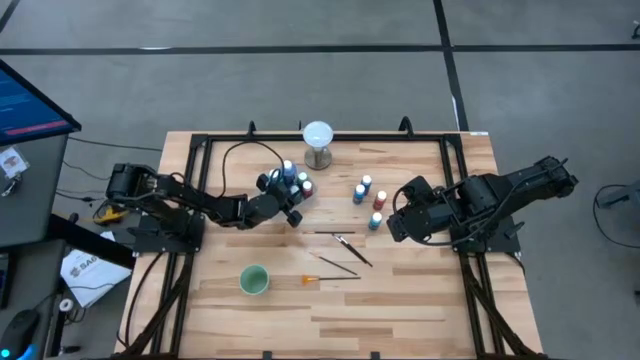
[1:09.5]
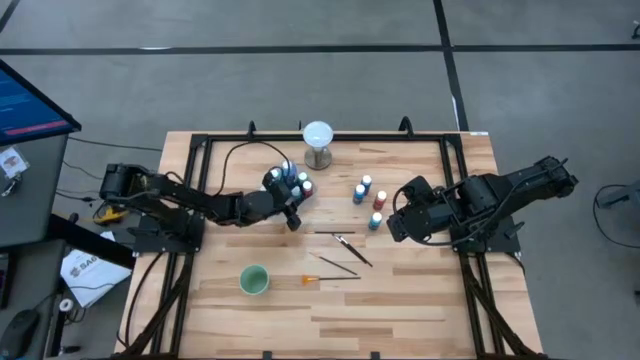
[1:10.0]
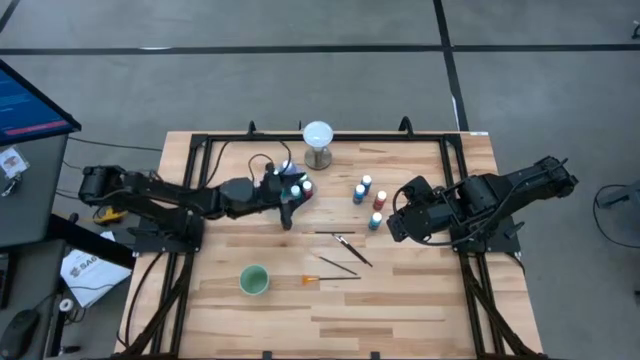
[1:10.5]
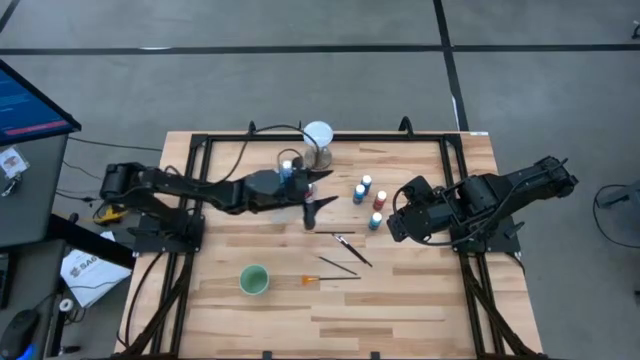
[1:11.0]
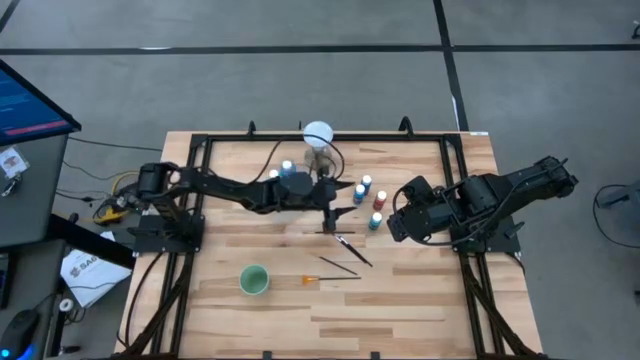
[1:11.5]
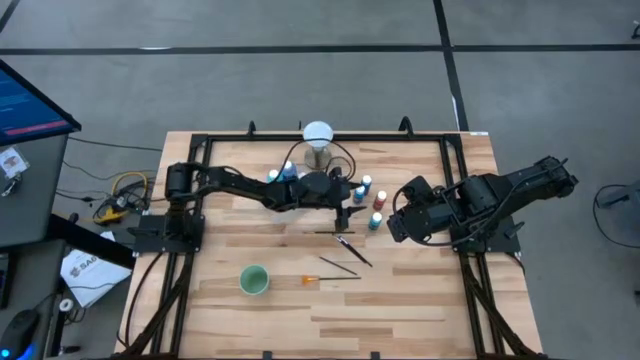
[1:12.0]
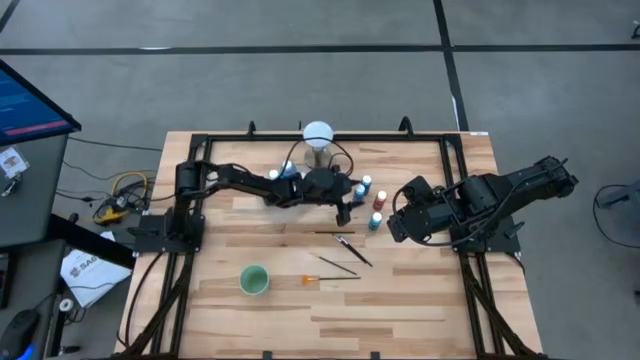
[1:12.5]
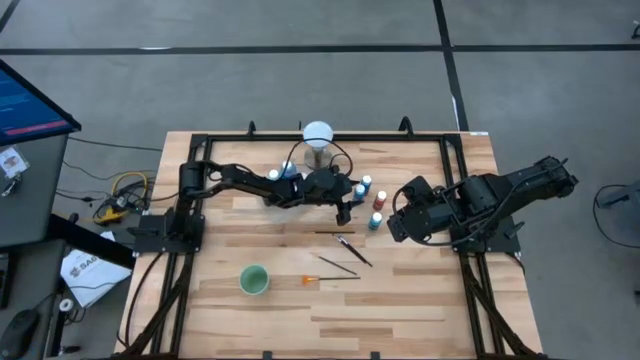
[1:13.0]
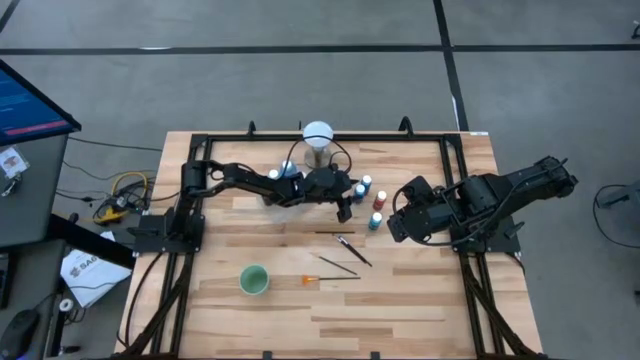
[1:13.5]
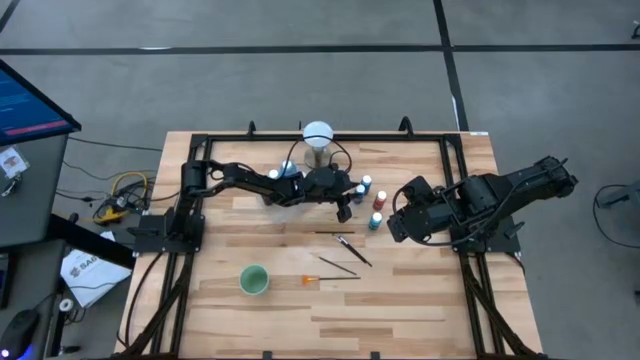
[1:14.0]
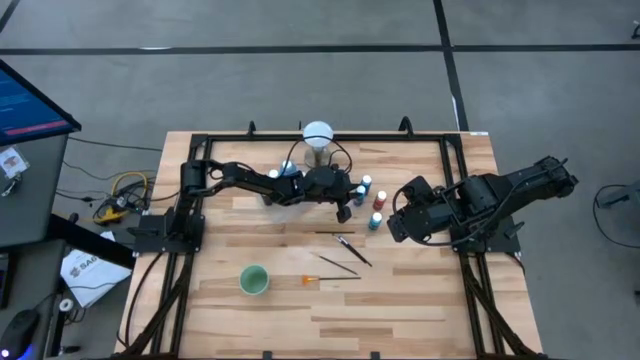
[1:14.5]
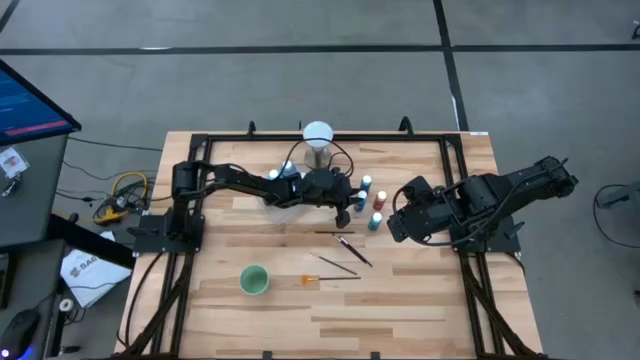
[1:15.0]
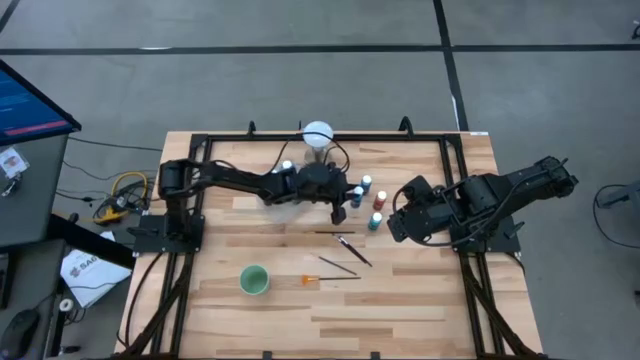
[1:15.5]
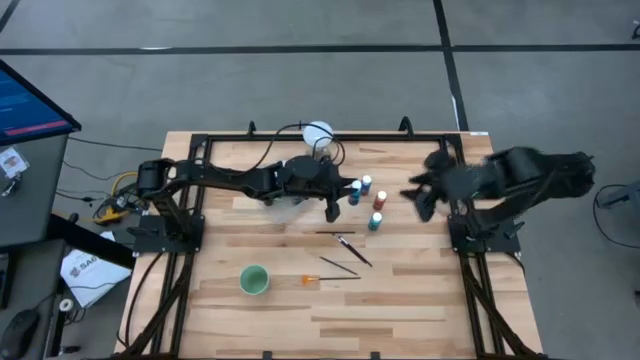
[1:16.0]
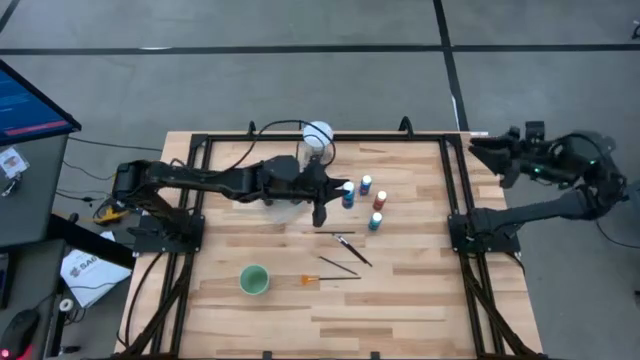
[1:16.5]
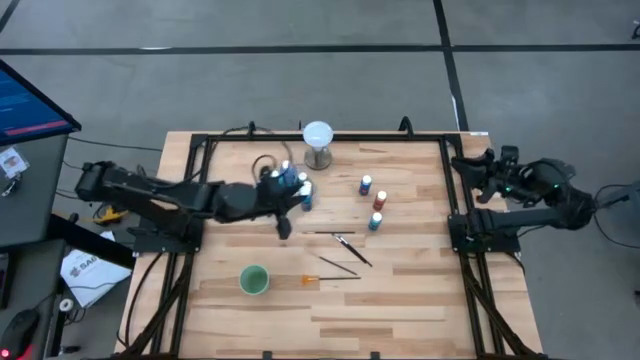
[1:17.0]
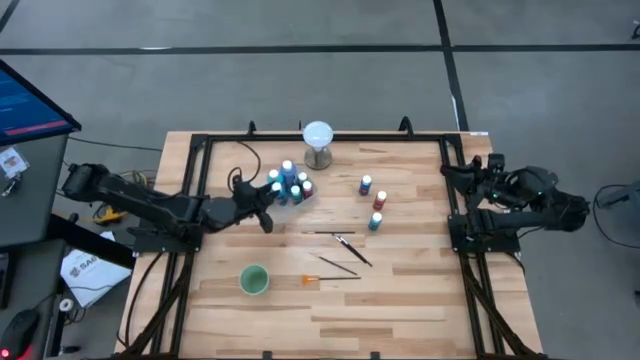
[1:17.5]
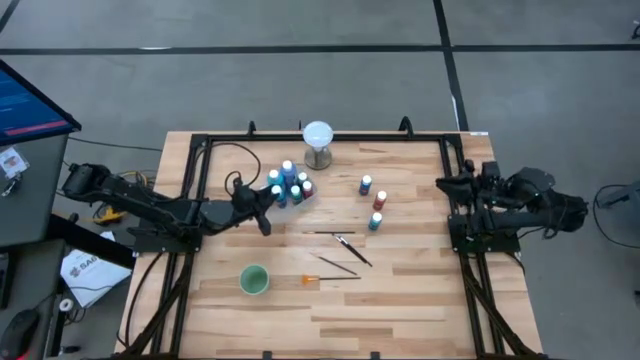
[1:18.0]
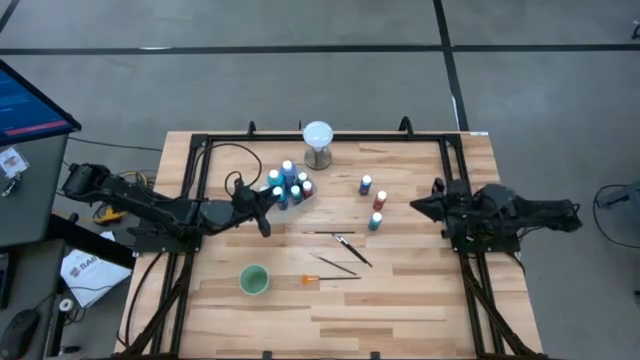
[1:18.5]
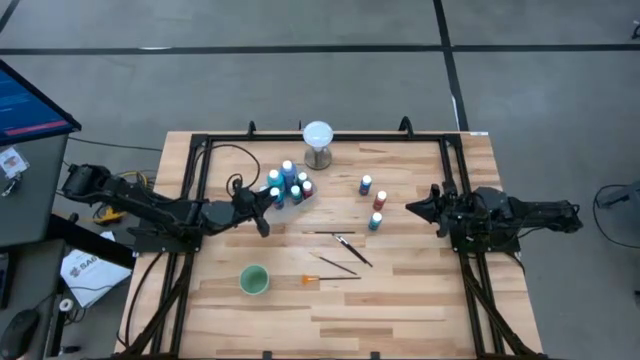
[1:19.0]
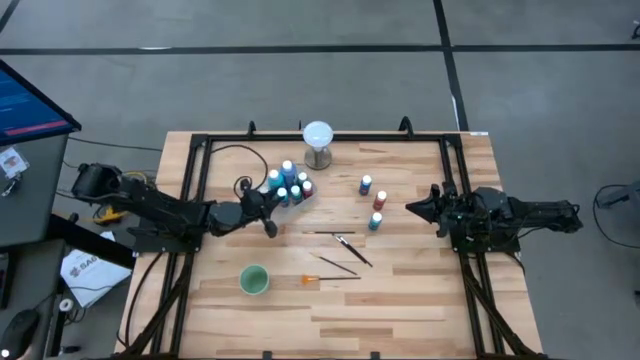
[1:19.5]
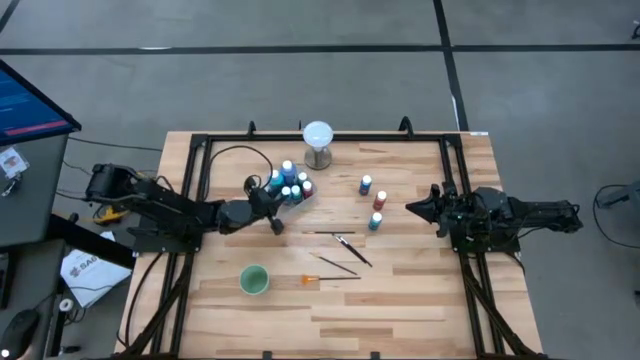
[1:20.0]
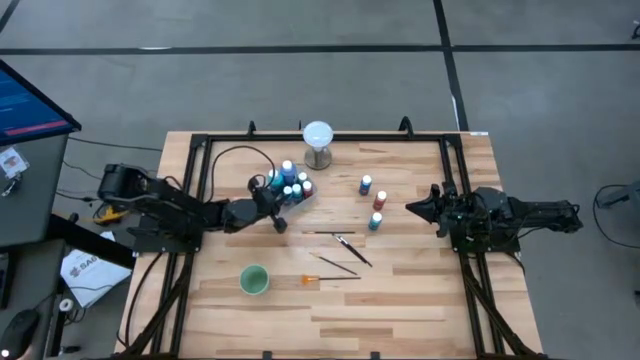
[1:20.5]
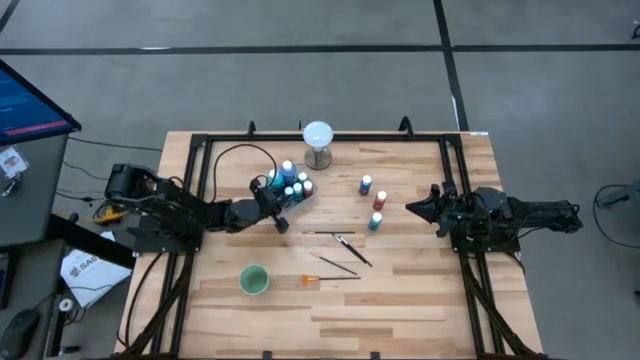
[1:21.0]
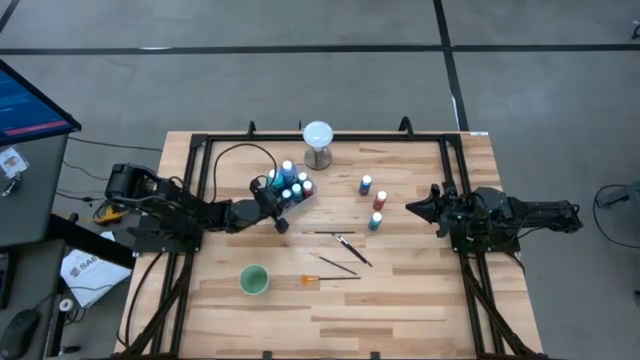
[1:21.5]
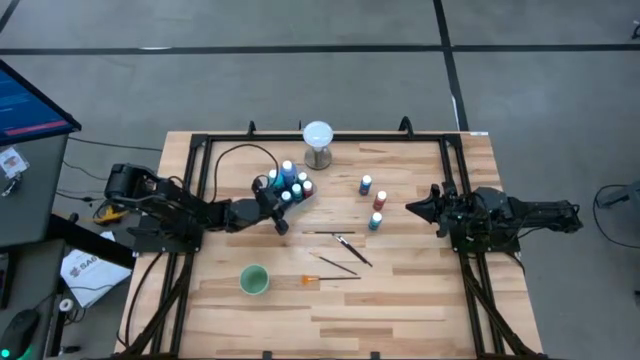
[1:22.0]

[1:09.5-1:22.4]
Task: Pick & Place Paint Supplies
Put the small light blue bottle into the white bin

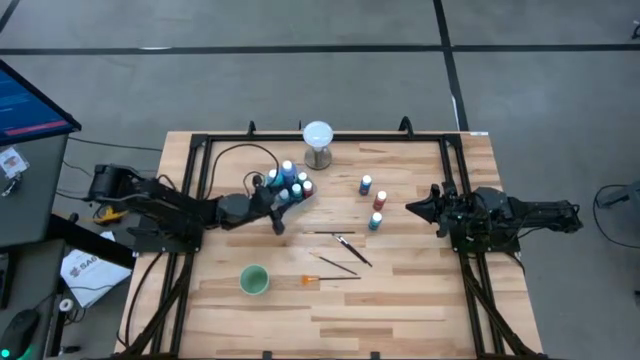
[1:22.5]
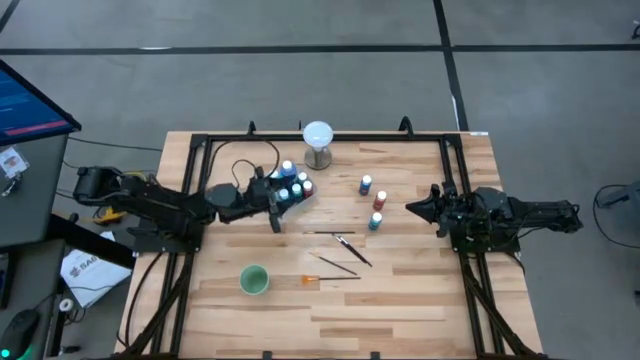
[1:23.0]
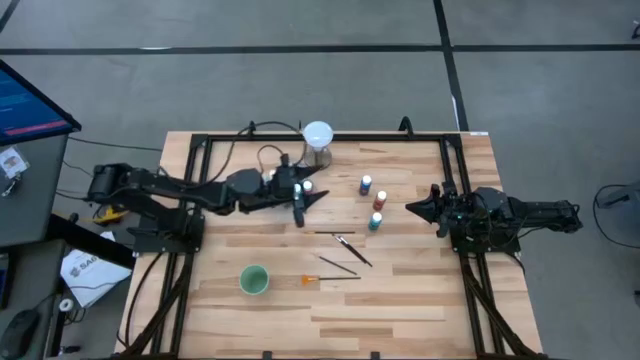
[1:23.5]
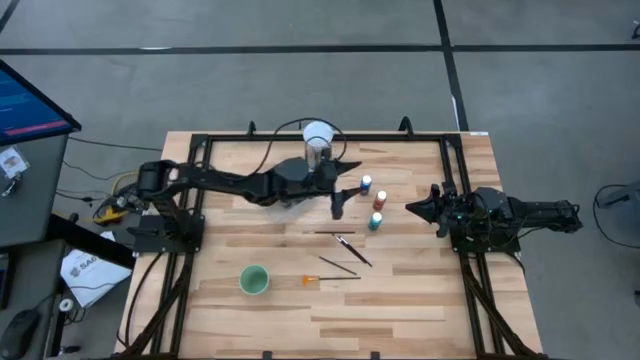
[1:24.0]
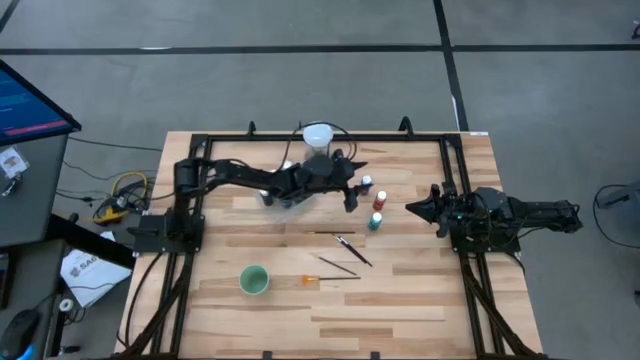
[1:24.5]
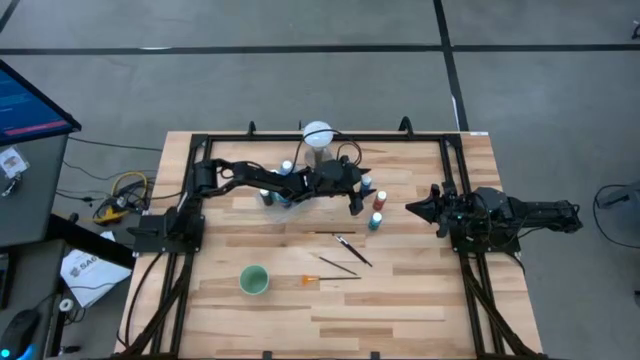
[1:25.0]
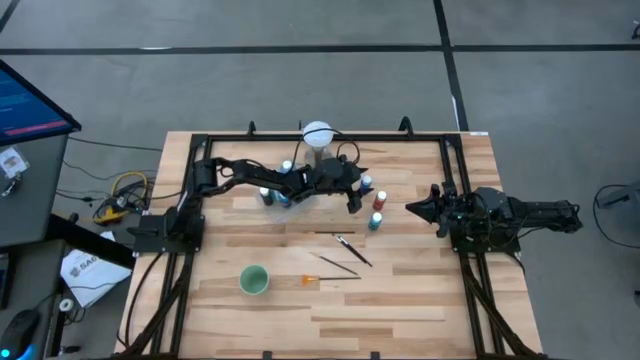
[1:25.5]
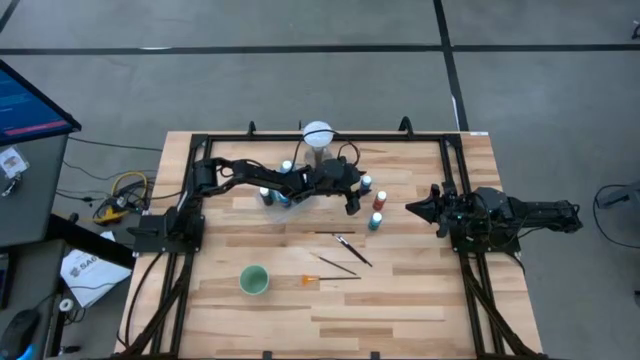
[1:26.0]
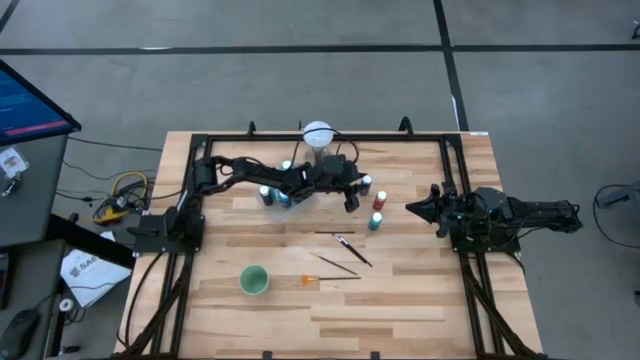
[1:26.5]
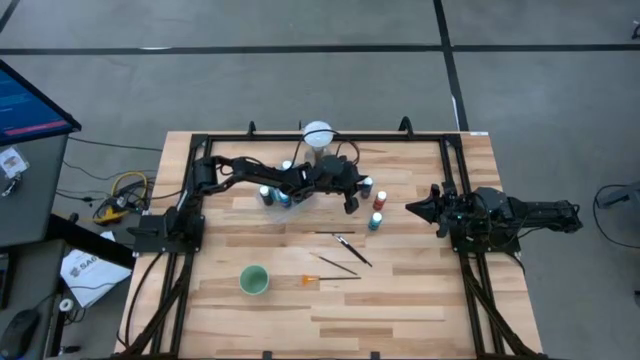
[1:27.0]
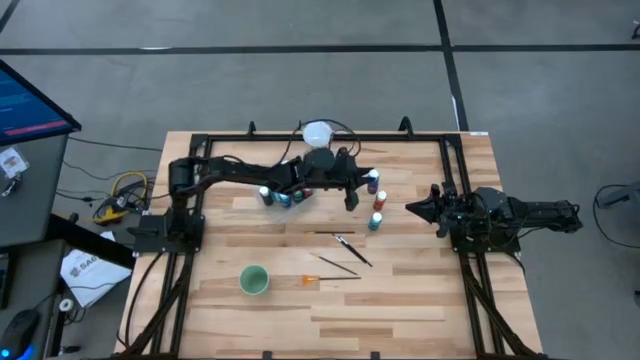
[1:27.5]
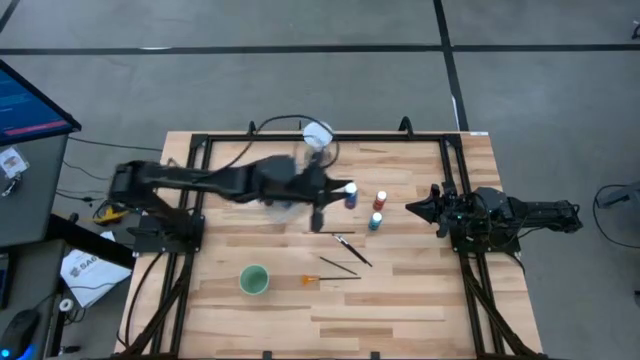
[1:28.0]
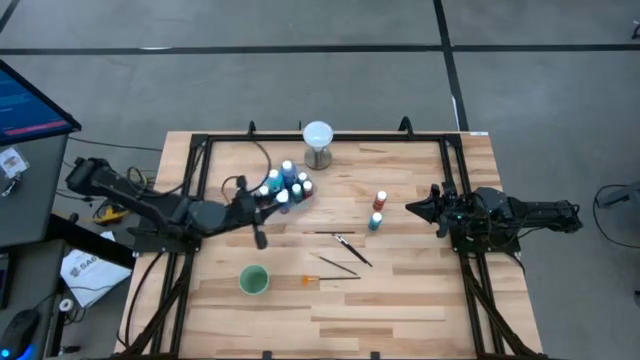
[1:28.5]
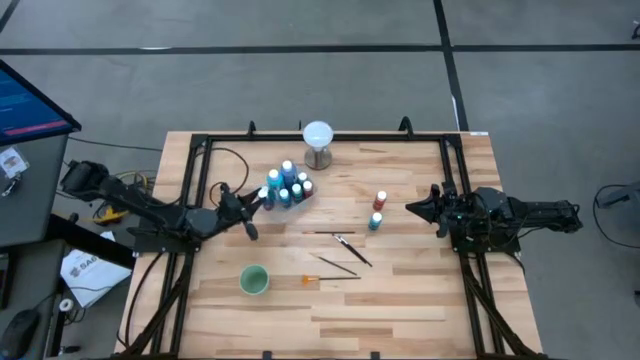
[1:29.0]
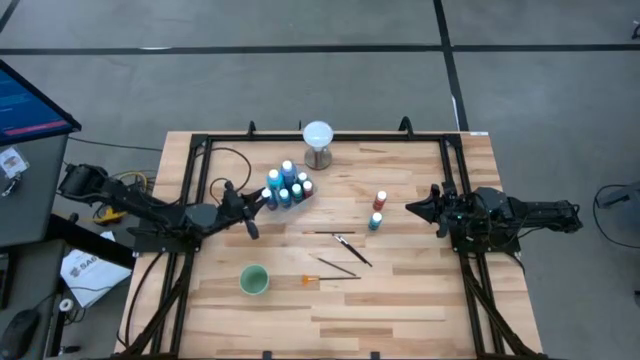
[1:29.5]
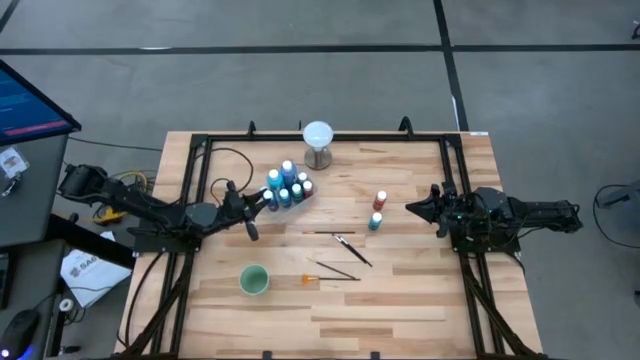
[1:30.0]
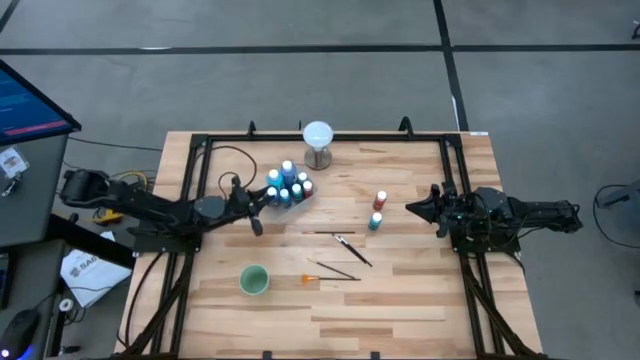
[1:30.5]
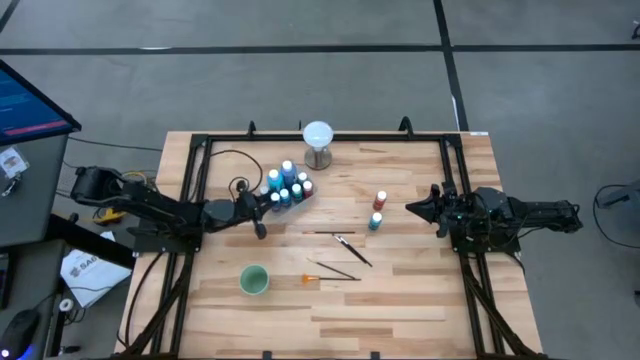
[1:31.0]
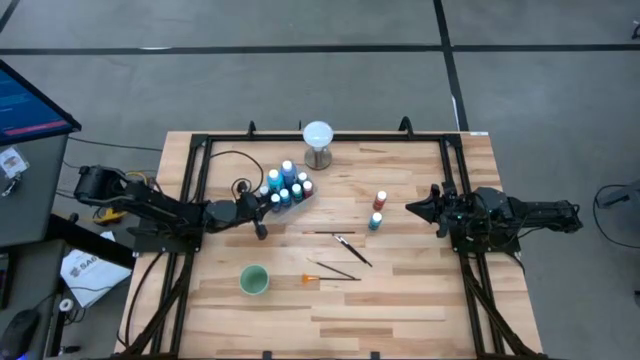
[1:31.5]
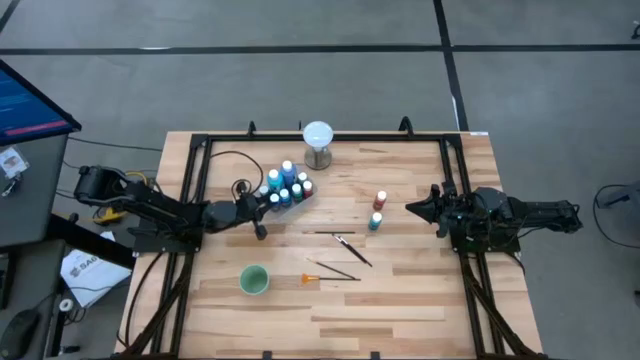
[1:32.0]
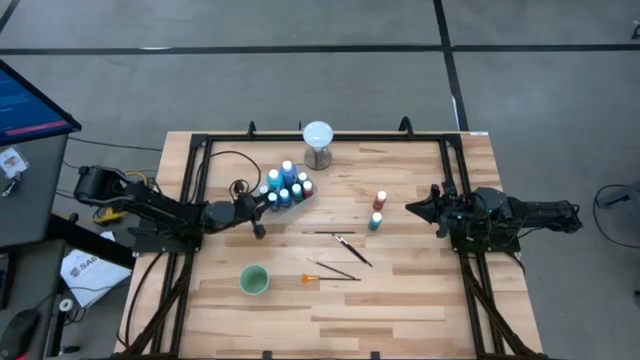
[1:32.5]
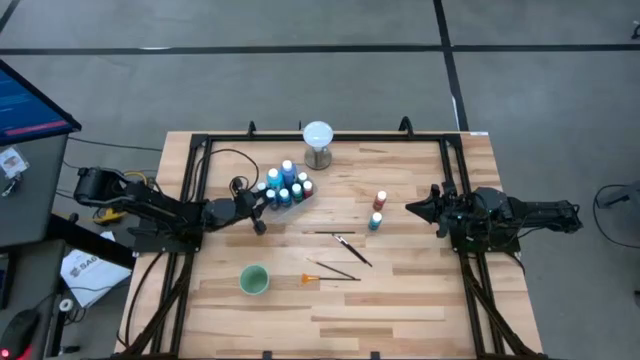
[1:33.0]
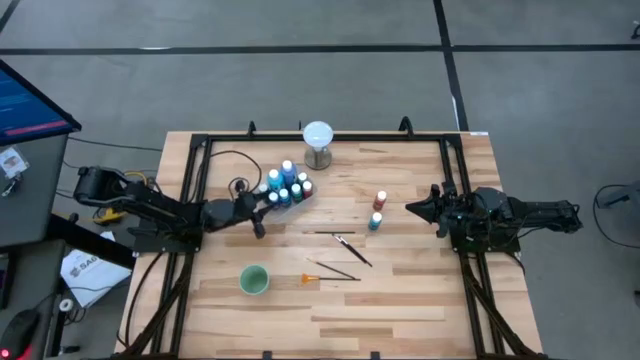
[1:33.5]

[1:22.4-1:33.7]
Put the small blue bottle into the white bin
